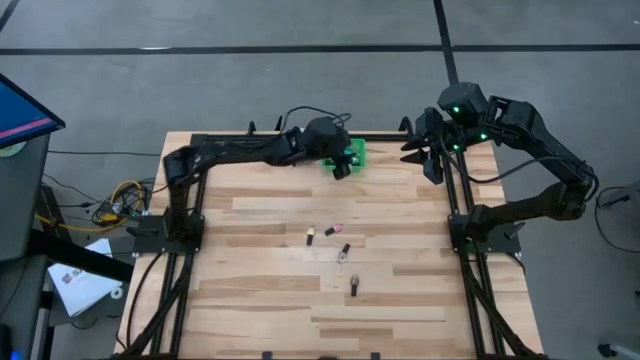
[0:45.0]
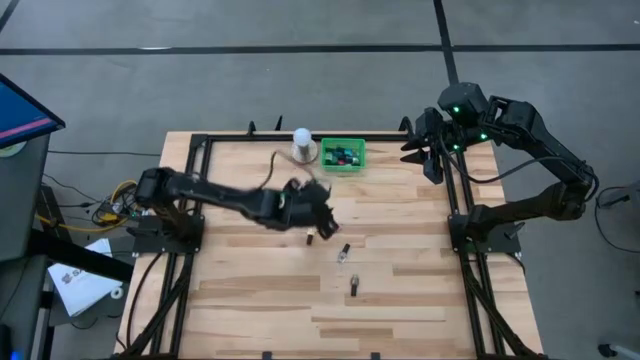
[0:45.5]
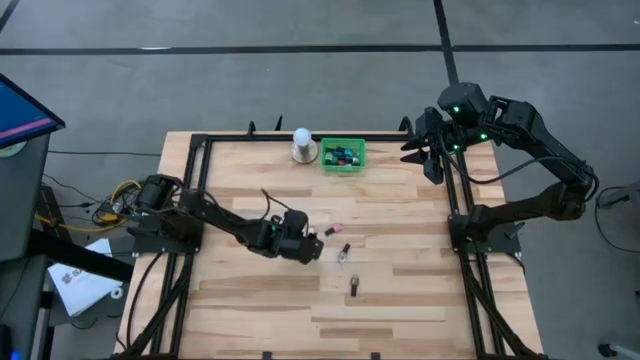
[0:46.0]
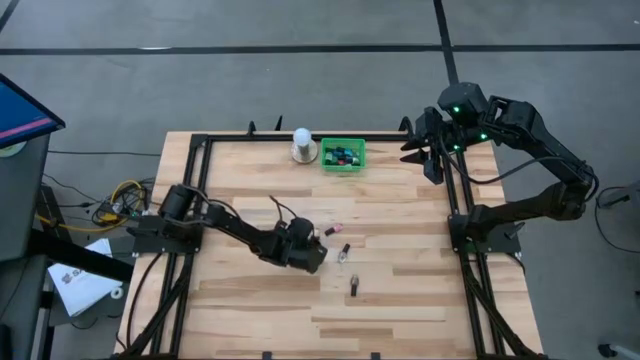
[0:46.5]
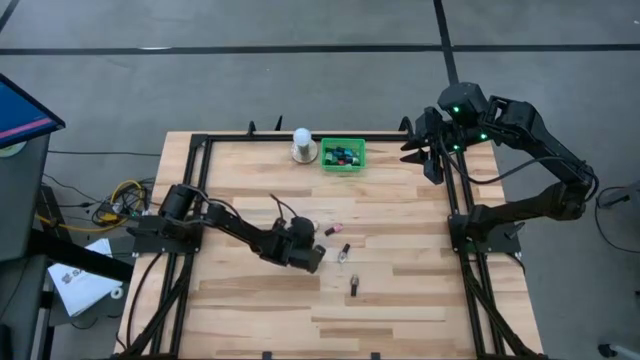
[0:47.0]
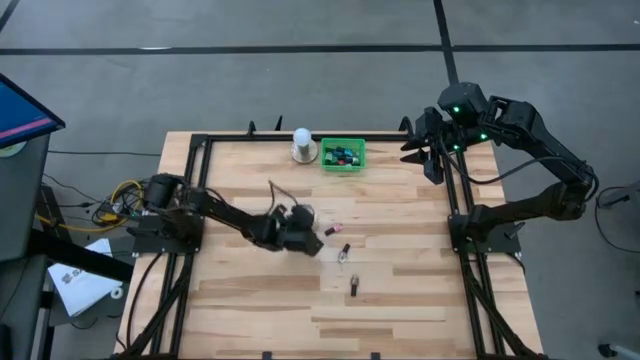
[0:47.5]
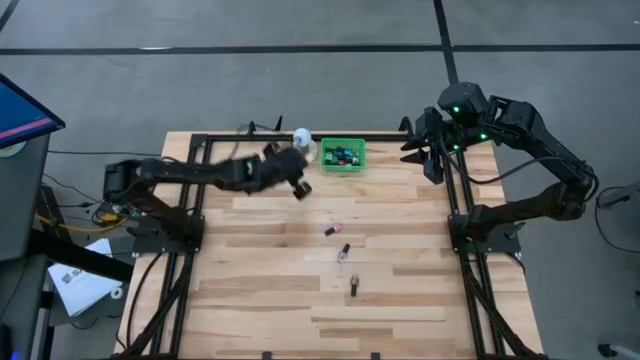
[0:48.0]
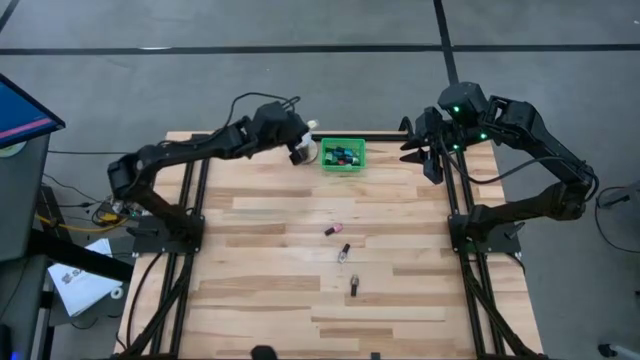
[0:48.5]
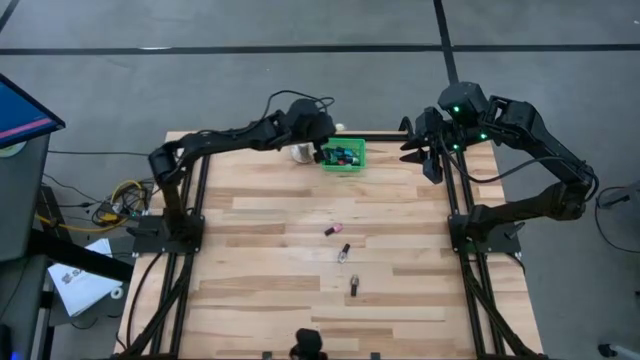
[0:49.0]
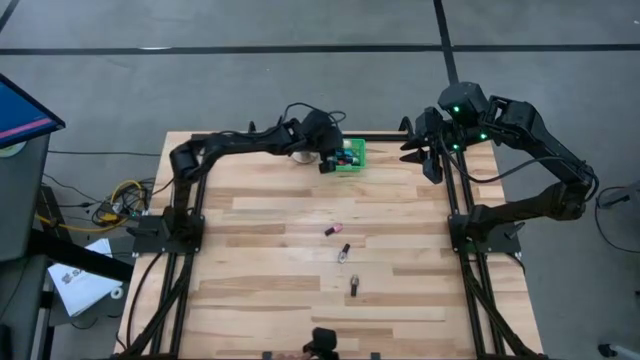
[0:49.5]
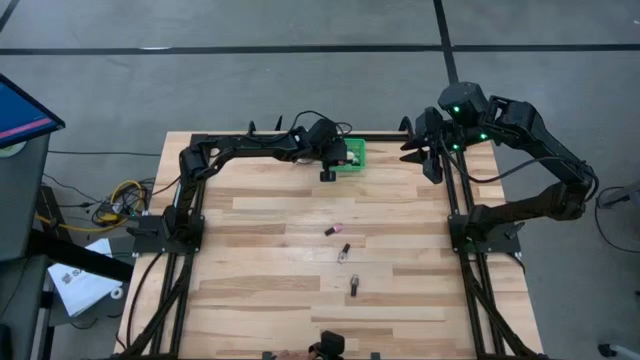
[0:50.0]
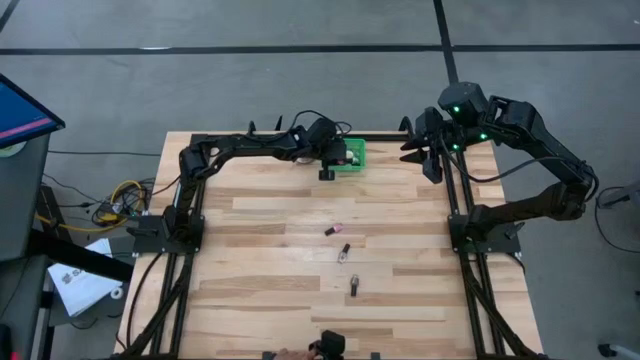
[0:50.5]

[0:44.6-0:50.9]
Task: Pick & Place Nail Polish
Put the light yellow nail polish bottle into the green basket

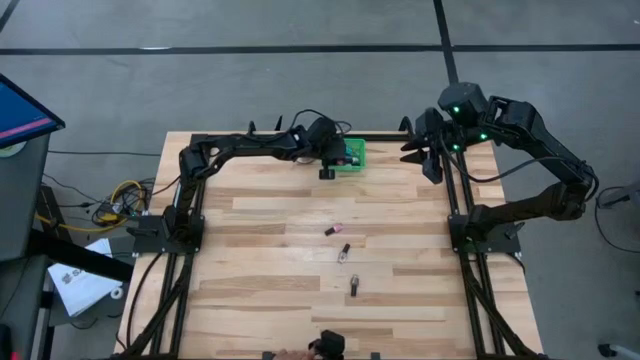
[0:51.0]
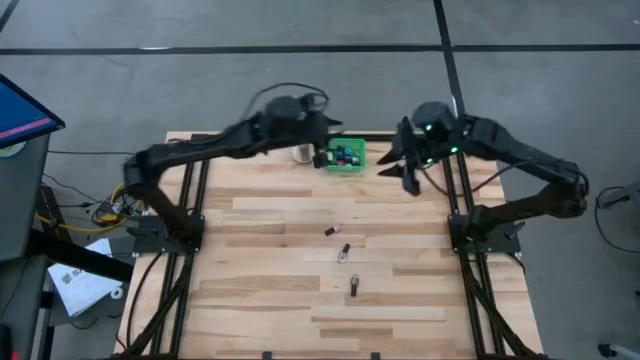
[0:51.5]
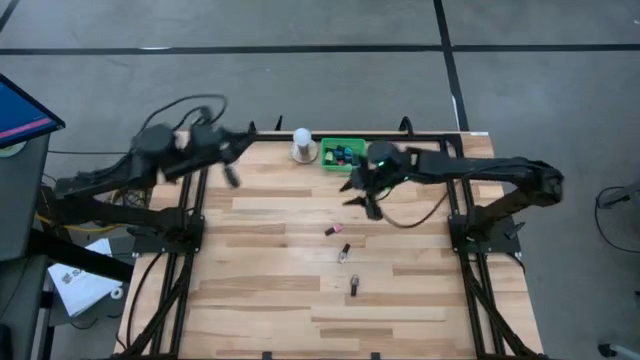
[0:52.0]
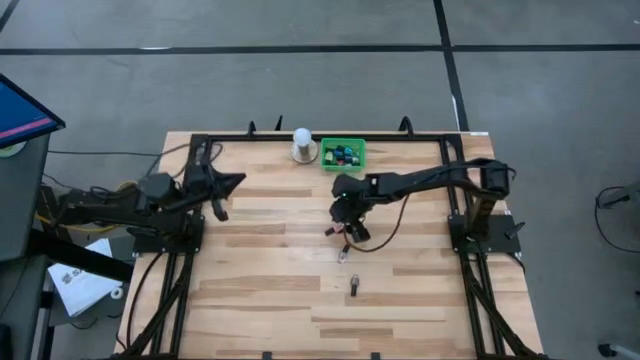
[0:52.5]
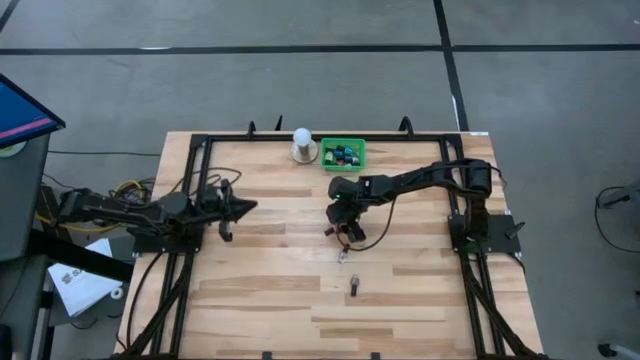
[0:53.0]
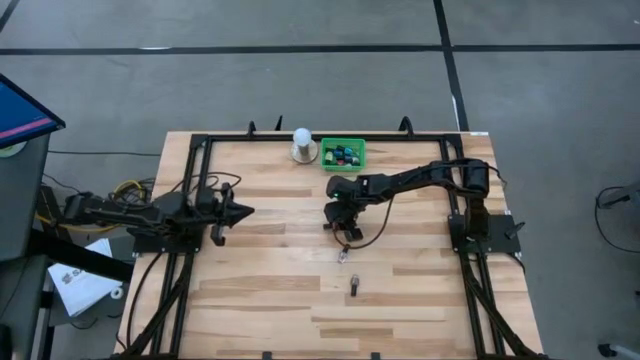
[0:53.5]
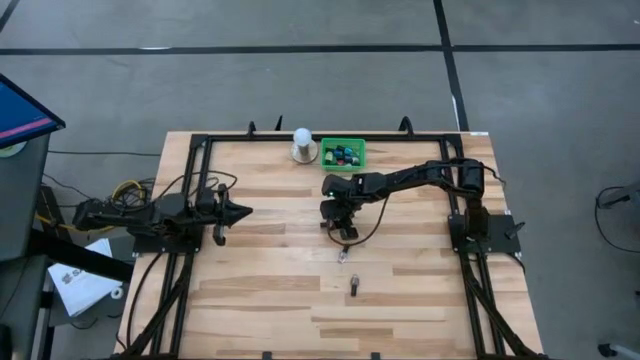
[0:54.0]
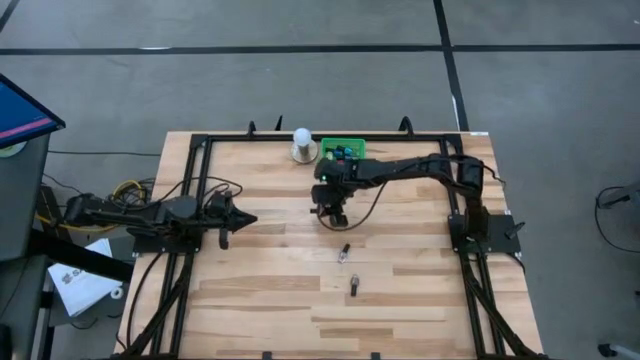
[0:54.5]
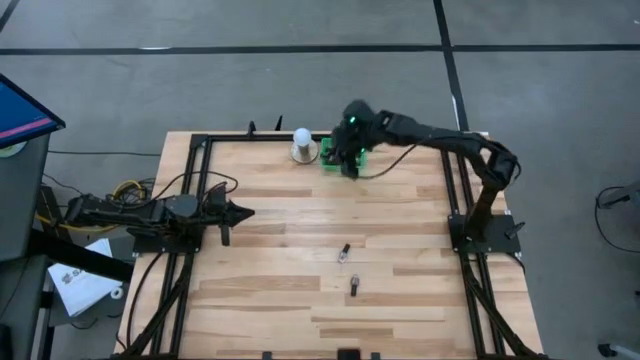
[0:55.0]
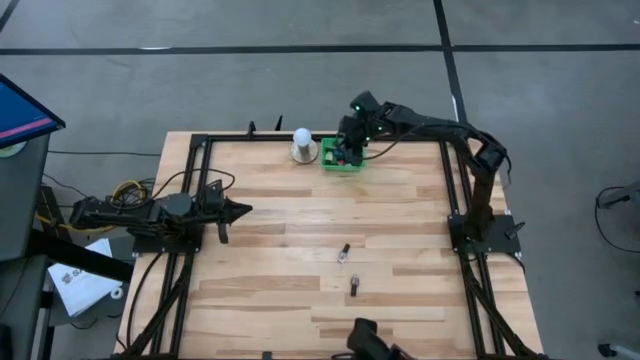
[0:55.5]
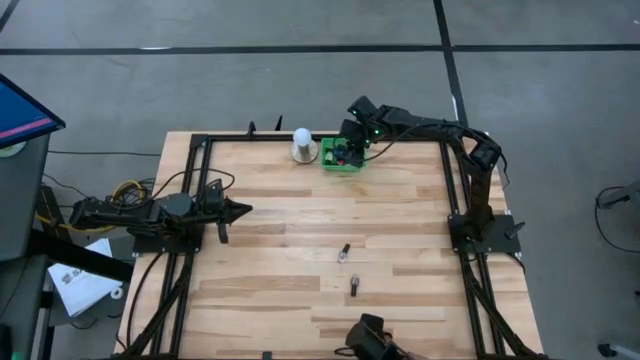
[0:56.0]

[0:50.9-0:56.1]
Put the pink nail polish bottle into the green basket

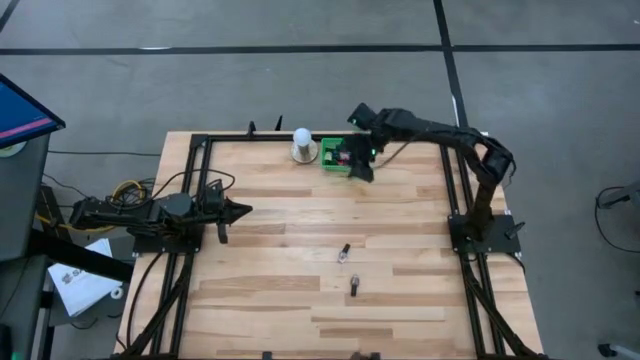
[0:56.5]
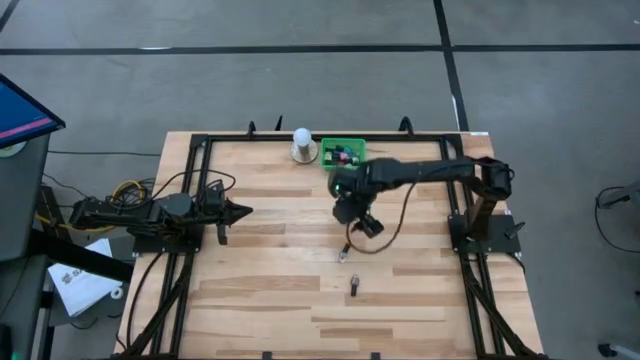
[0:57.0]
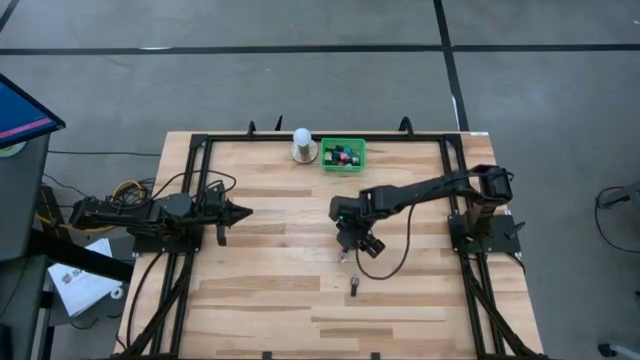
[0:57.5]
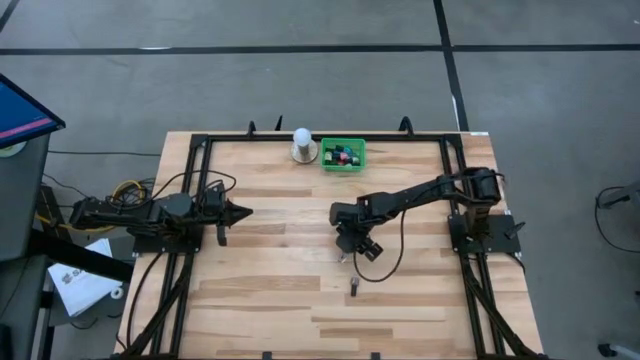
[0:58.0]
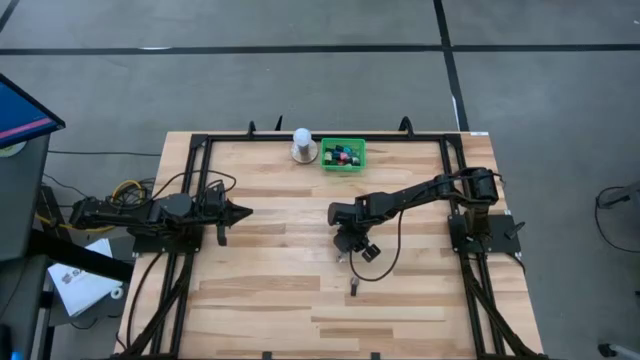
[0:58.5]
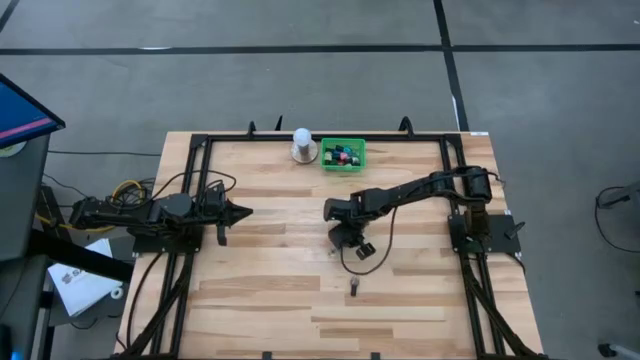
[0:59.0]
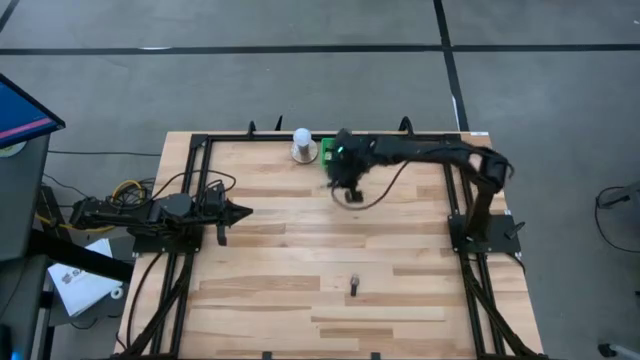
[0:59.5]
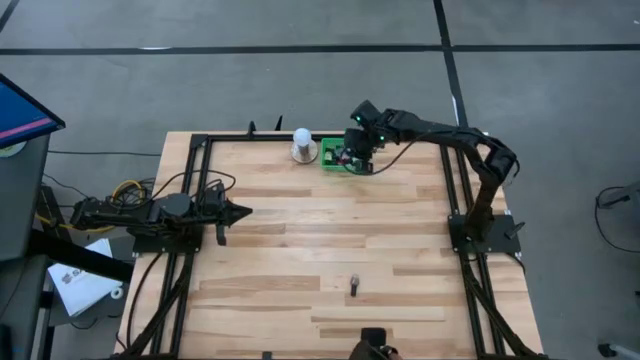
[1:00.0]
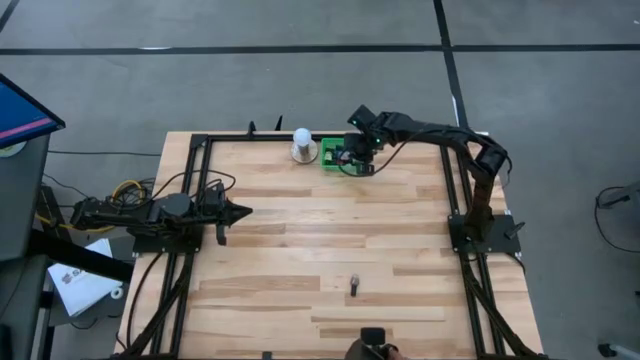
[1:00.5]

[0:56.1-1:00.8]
Put the transparent nail polish bottle into the green basket

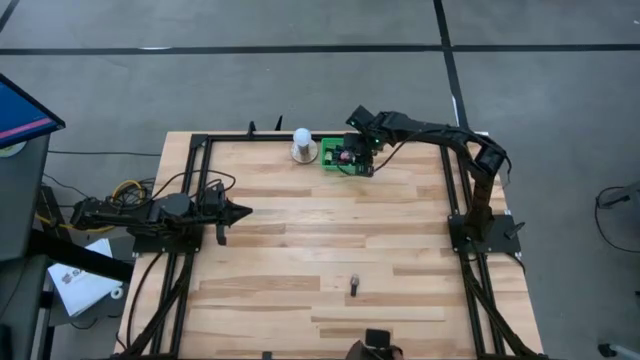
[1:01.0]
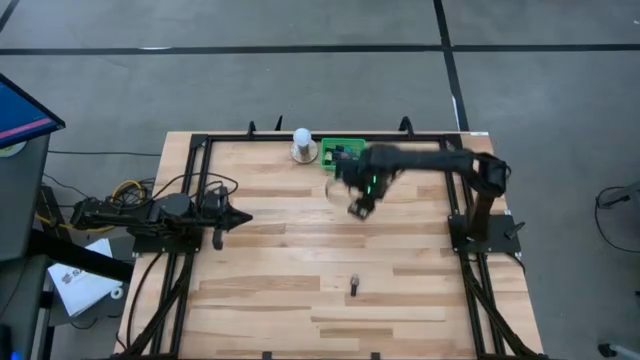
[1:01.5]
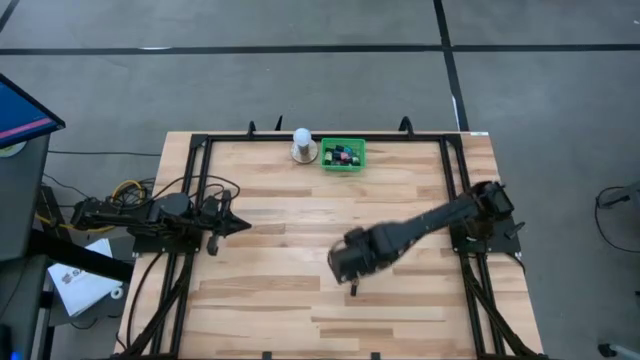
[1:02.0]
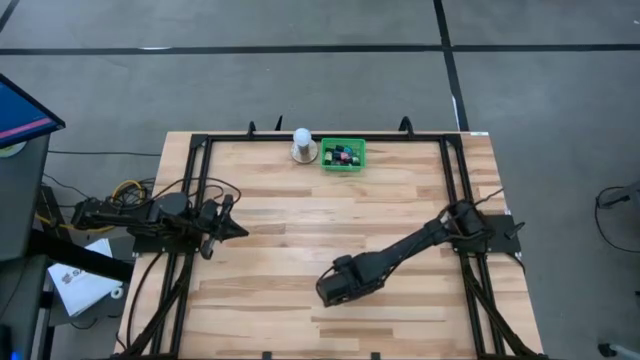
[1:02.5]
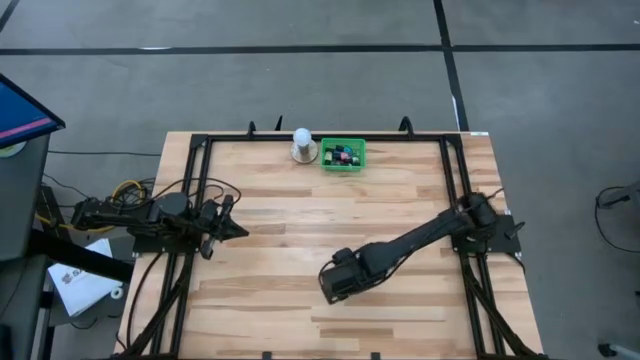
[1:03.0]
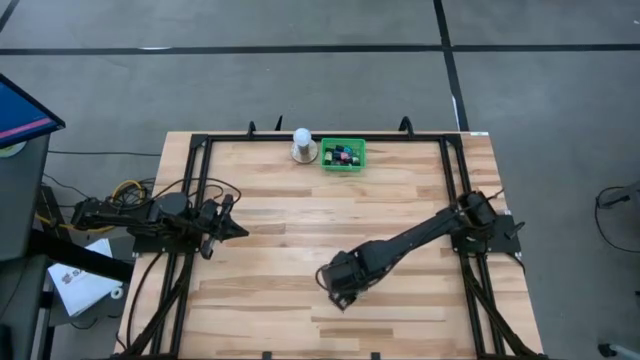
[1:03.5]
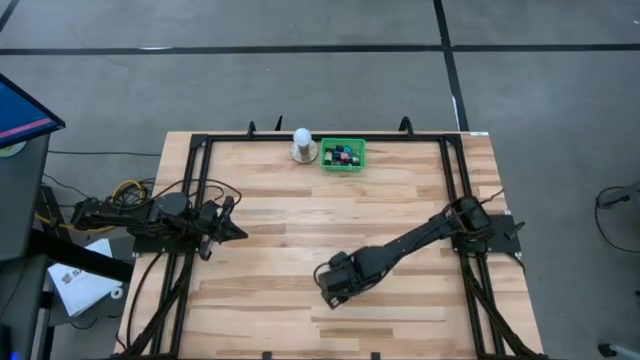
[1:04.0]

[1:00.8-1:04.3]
Put the brown nail polish bottle into the green basket

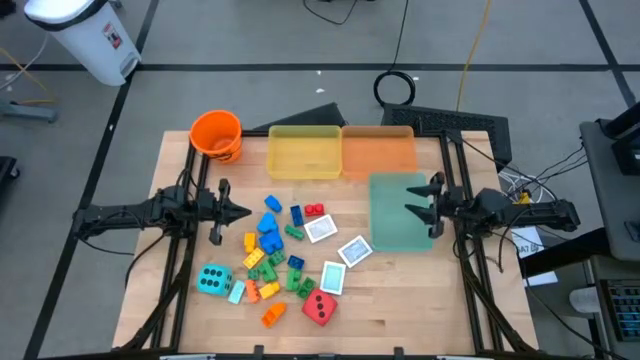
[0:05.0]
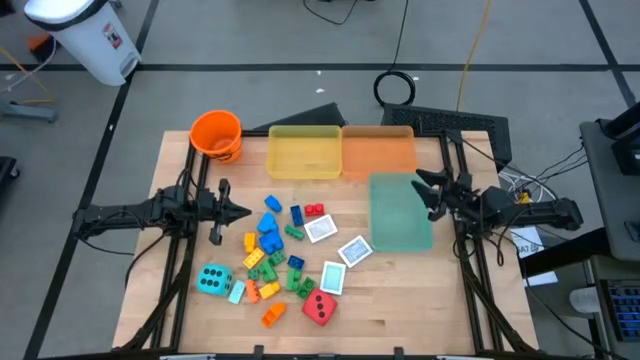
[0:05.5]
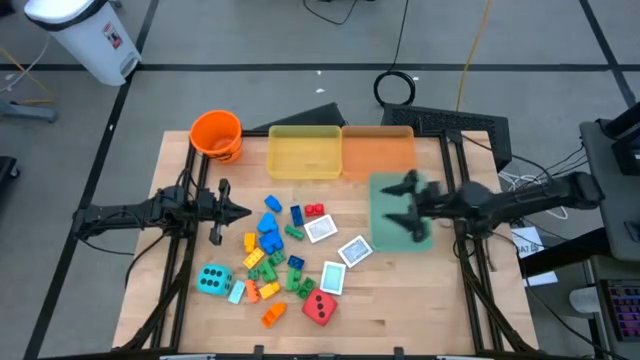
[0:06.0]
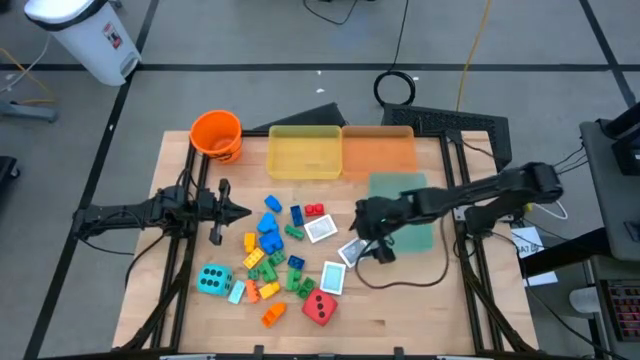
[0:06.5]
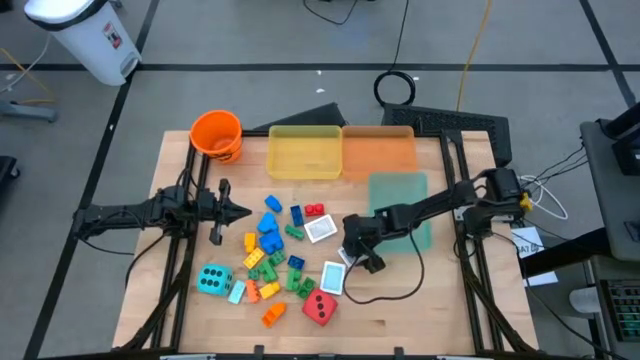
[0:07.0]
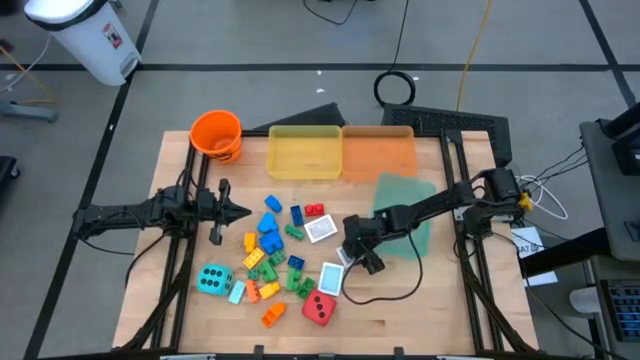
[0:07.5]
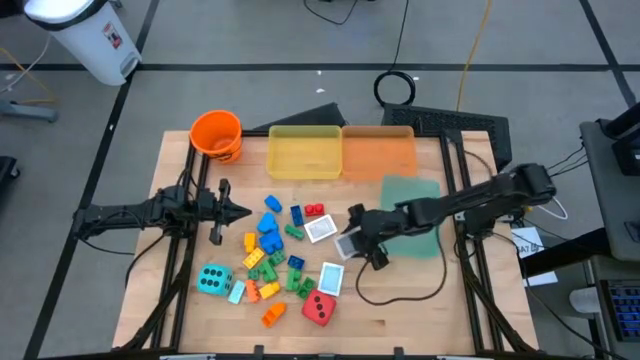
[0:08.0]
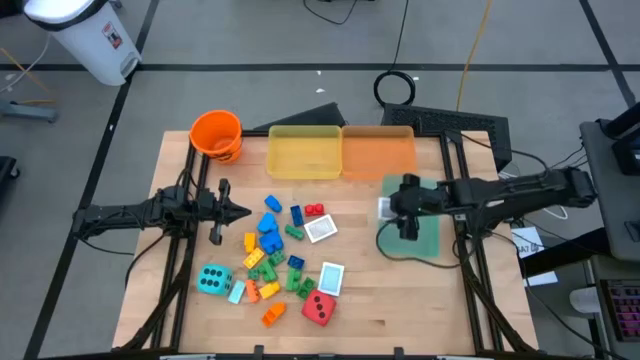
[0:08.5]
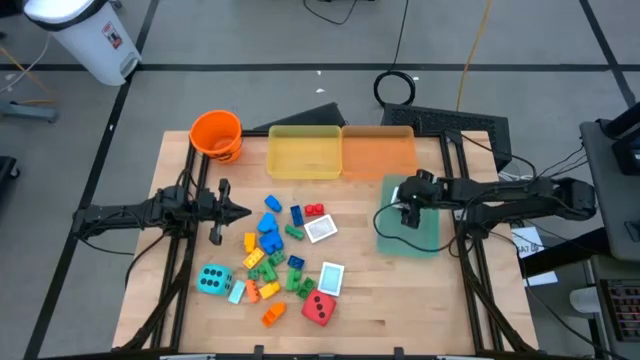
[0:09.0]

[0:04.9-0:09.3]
Task: Pick & Place Toys
Put the black deck of cards into the blue bin
